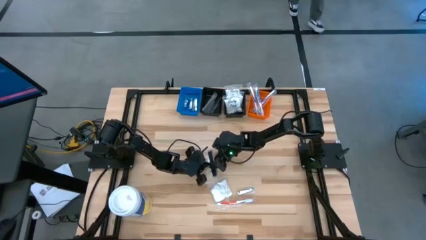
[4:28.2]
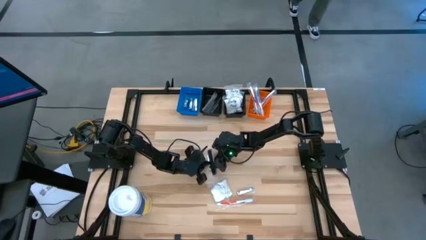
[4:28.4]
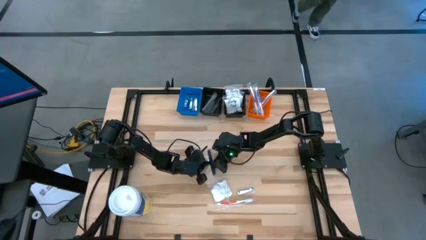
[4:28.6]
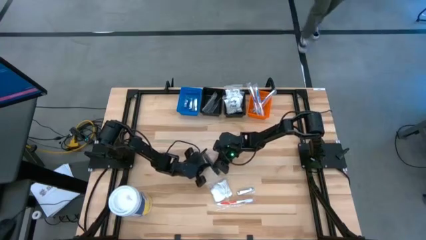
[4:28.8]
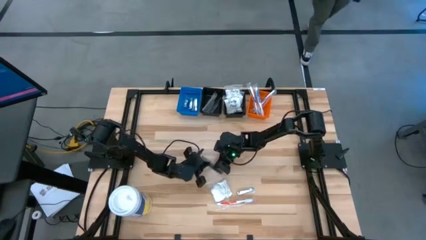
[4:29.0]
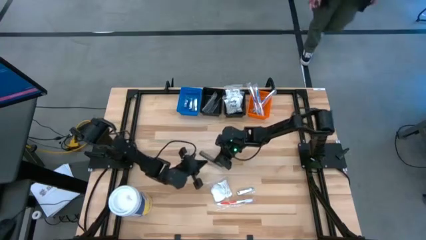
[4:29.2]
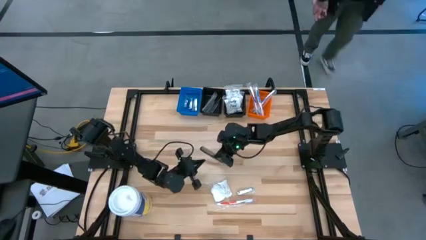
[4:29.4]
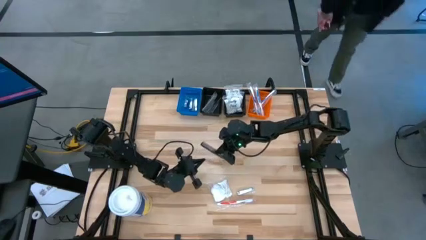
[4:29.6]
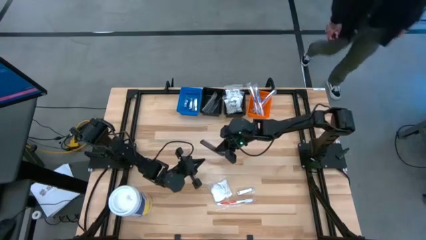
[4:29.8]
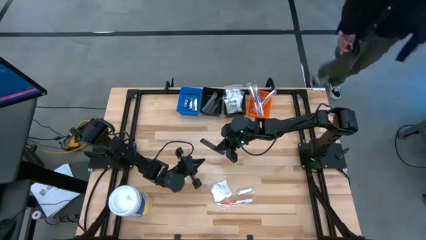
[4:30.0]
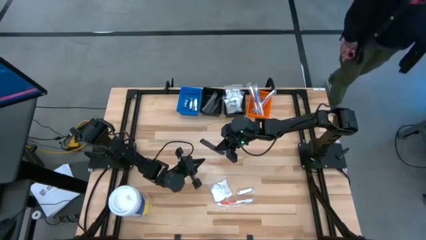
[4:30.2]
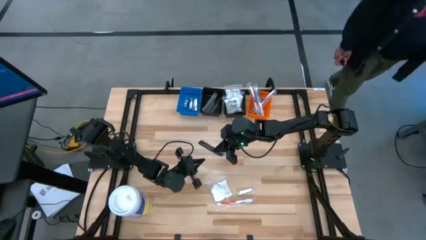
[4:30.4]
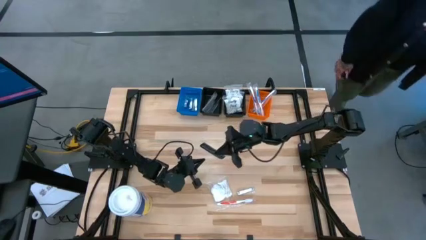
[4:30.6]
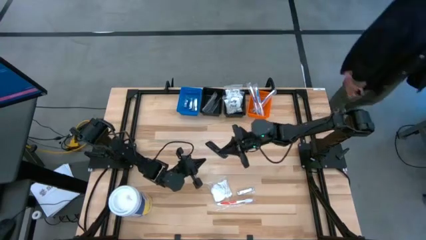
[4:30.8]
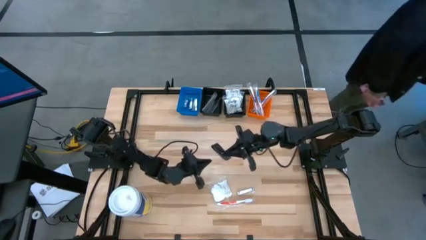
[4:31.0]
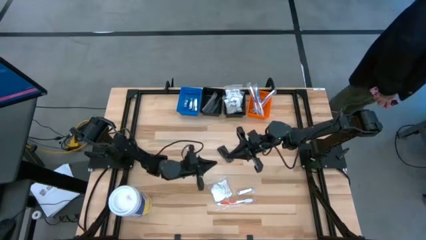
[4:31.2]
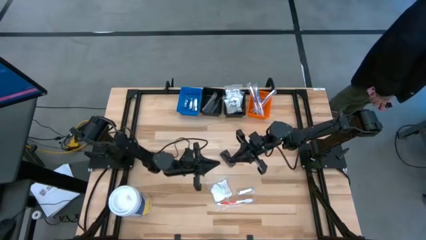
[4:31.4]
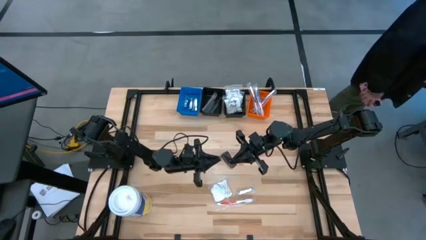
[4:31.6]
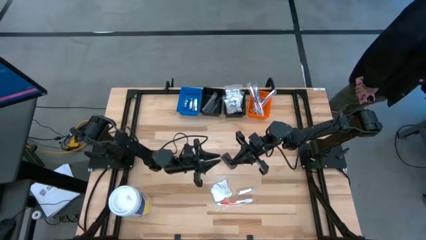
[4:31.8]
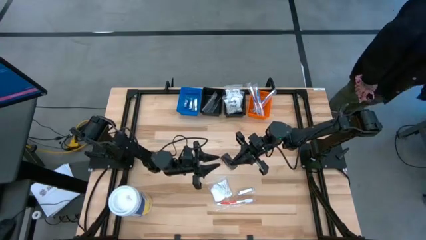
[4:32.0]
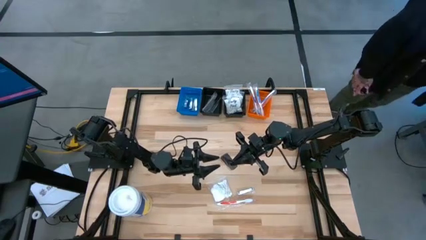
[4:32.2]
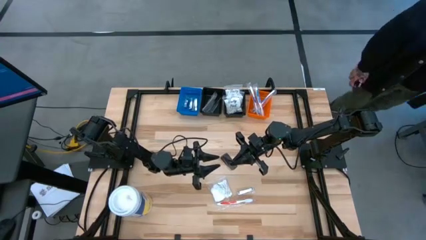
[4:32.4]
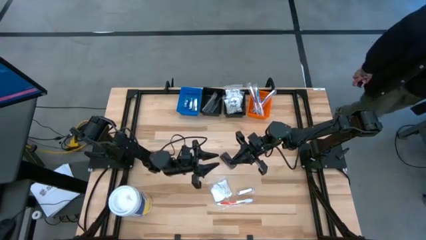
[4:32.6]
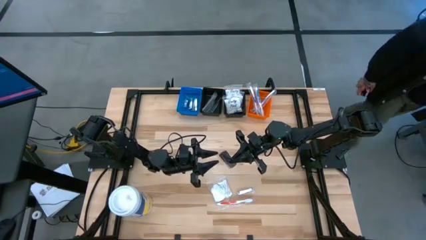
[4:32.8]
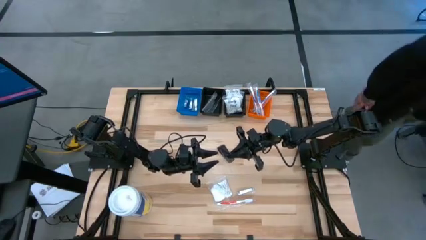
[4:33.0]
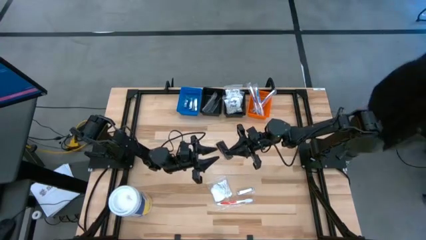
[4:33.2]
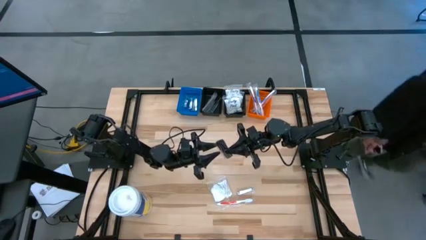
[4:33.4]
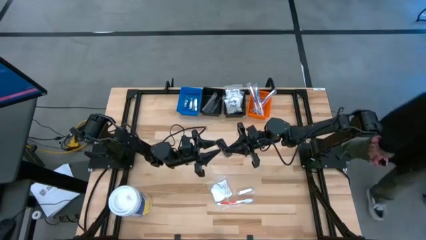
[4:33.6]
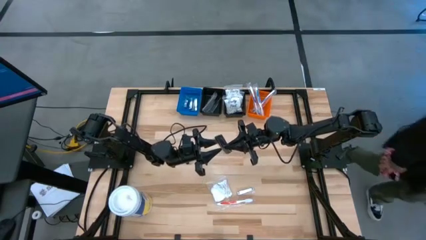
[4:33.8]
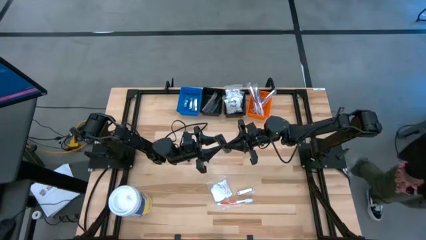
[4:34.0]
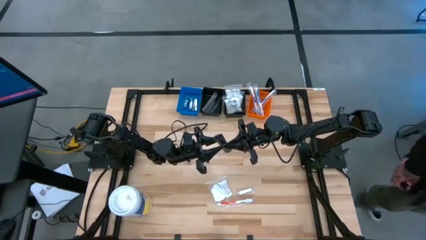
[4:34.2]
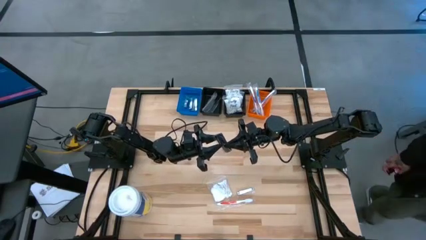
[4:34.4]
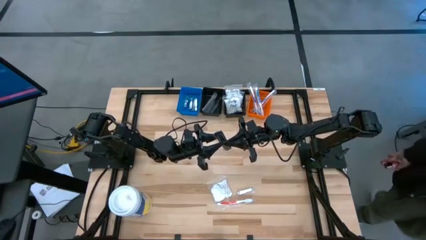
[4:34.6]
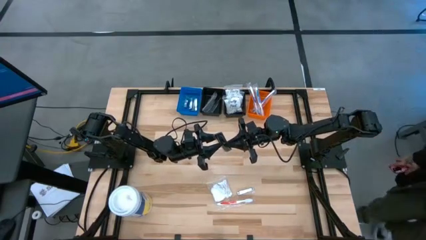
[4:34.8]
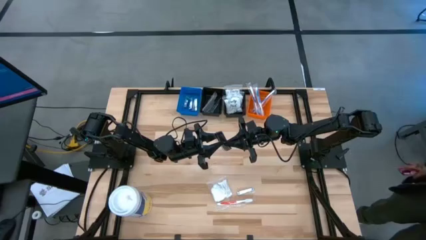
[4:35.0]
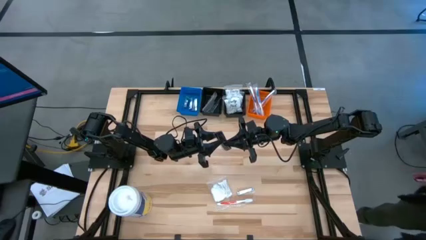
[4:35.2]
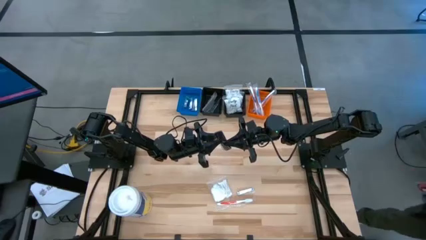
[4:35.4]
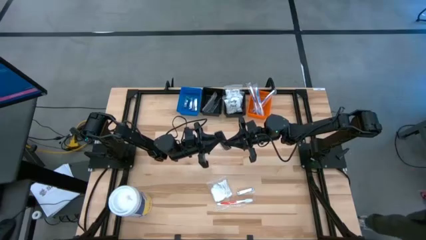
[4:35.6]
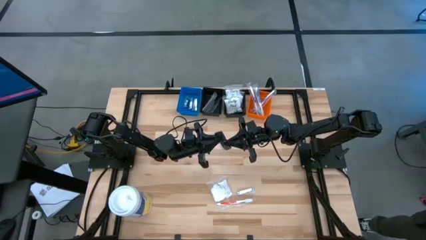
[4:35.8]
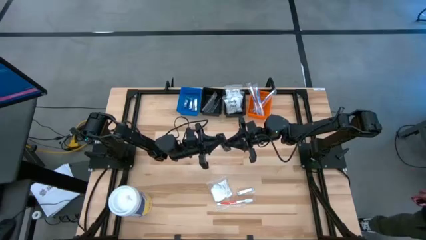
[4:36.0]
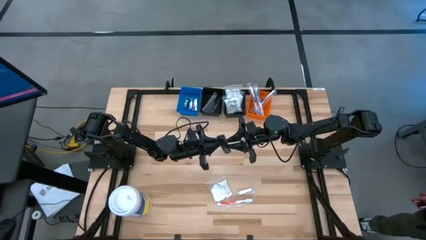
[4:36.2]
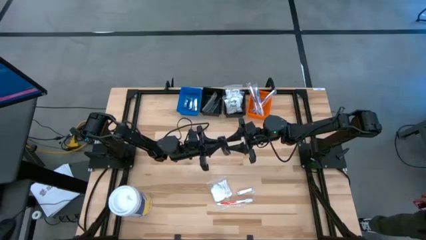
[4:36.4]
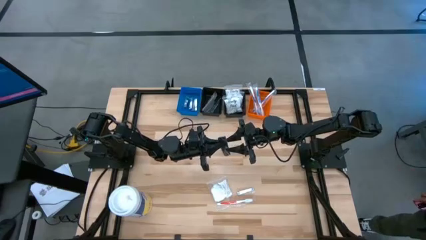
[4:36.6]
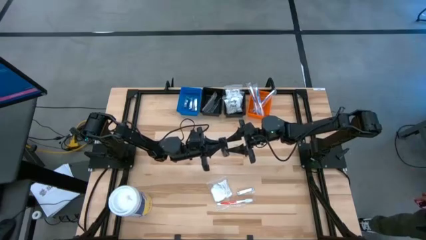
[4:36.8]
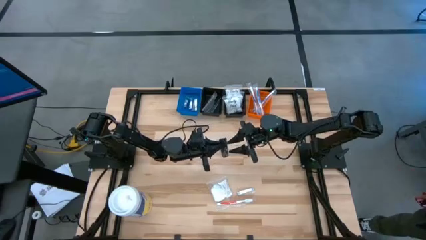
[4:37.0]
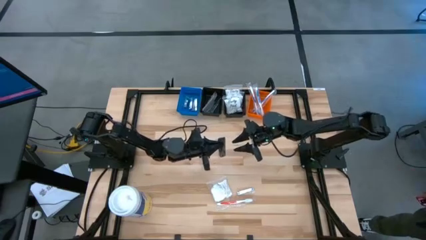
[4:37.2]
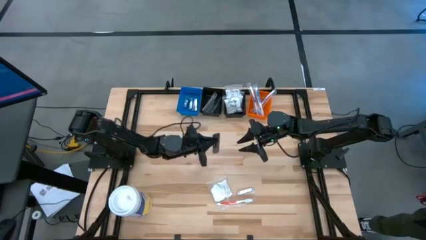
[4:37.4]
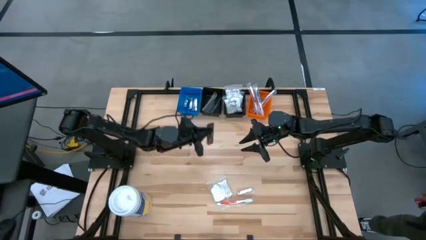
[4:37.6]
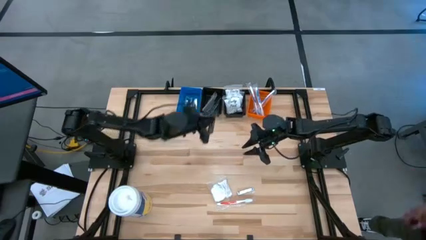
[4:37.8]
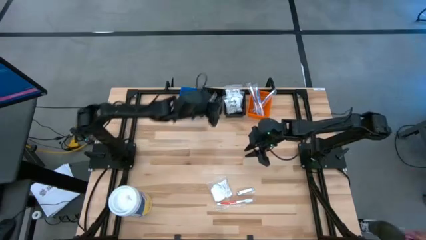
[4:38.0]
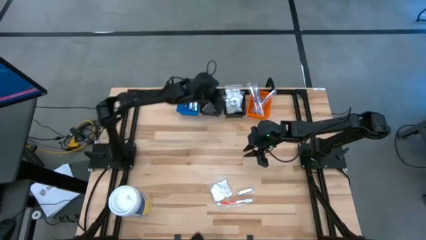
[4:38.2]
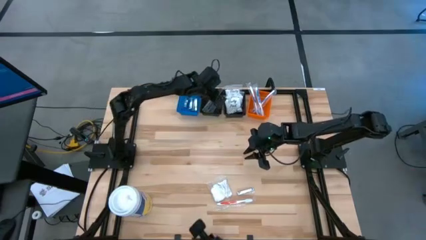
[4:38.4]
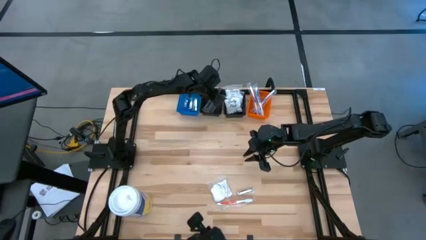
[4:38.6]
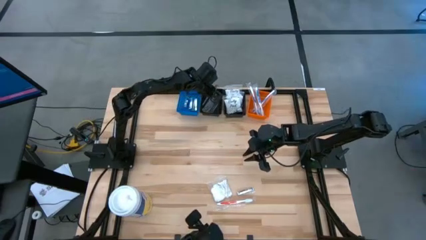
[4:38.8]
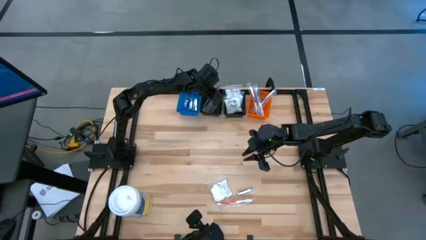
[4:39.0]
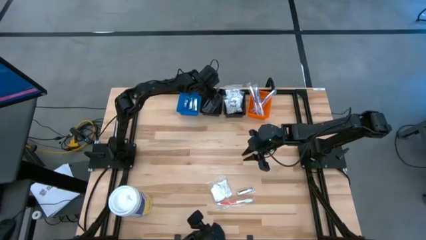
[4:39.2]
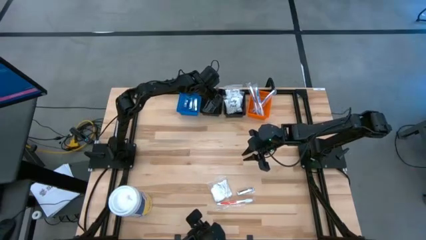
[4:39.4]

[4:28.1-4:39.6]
Task: Pick & Place Travel size toiletries
Put the black comb into the left black bin

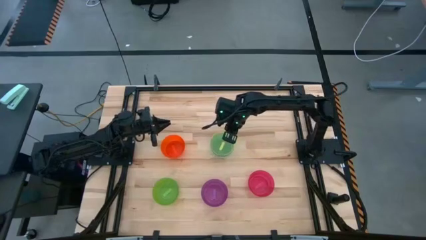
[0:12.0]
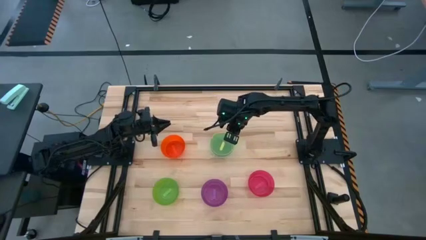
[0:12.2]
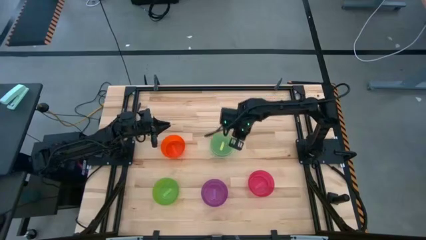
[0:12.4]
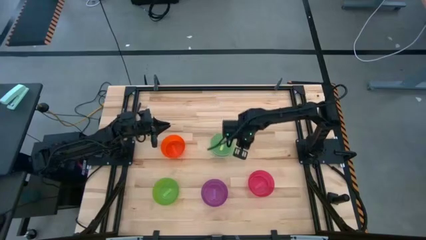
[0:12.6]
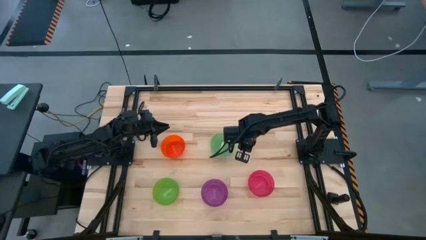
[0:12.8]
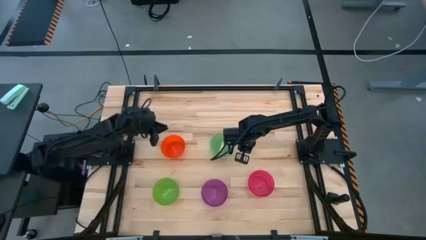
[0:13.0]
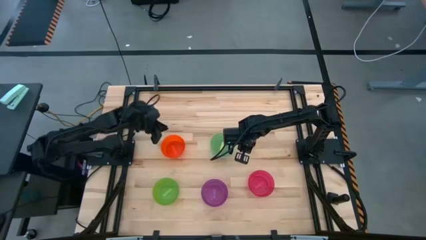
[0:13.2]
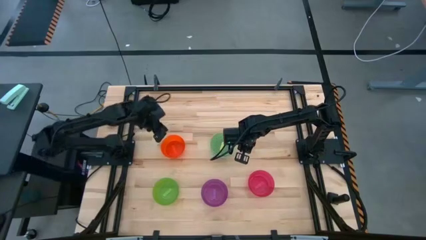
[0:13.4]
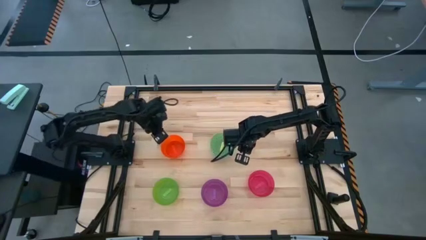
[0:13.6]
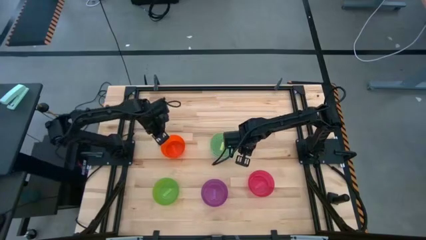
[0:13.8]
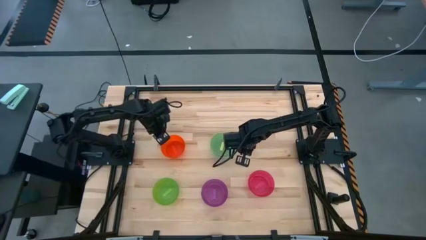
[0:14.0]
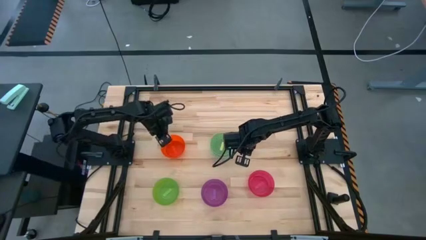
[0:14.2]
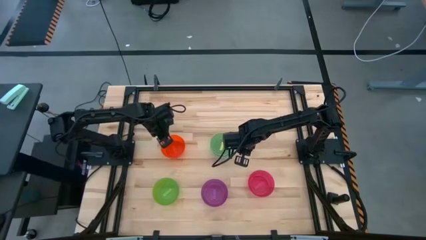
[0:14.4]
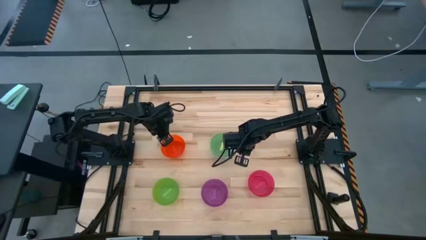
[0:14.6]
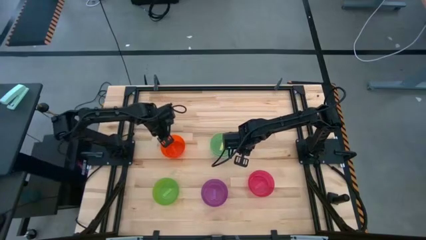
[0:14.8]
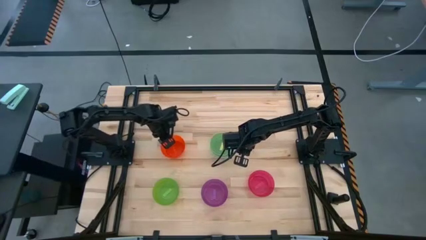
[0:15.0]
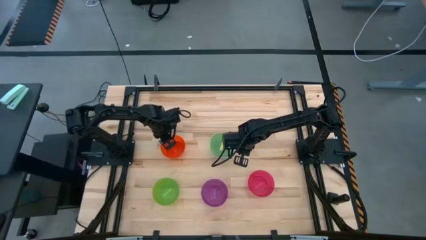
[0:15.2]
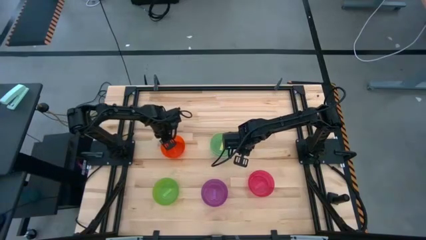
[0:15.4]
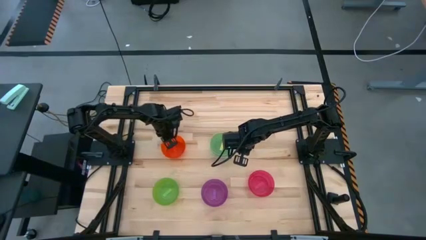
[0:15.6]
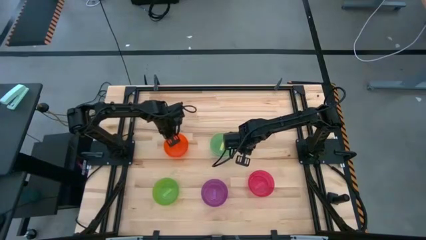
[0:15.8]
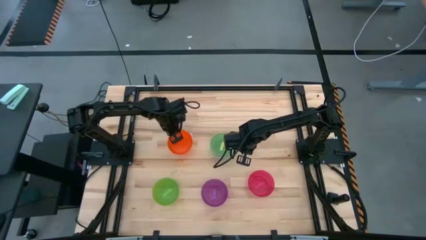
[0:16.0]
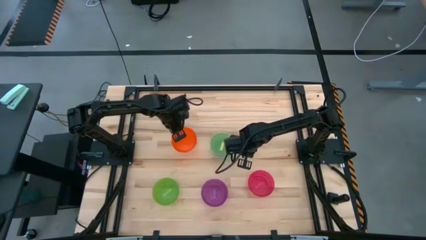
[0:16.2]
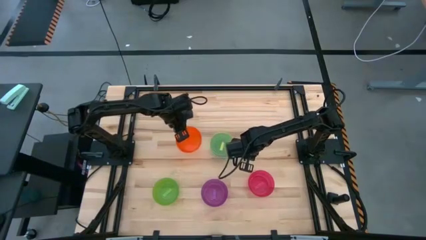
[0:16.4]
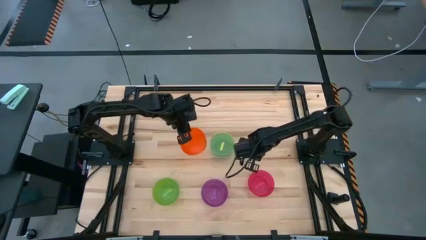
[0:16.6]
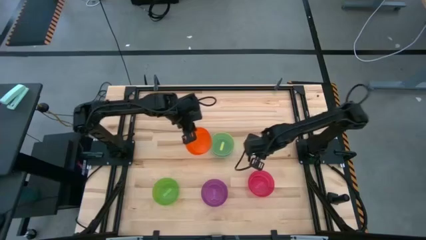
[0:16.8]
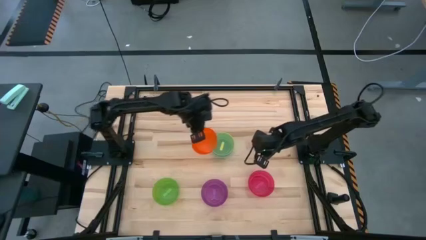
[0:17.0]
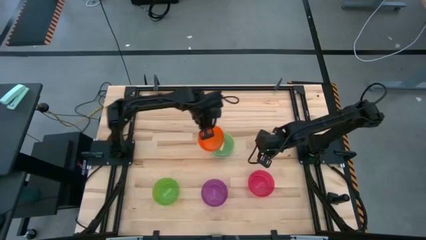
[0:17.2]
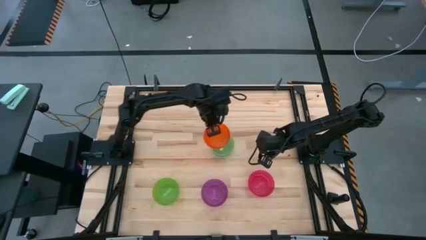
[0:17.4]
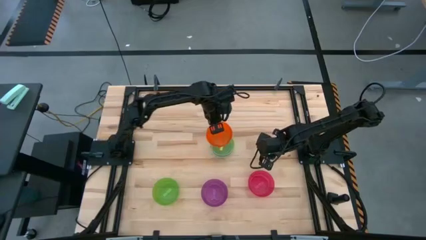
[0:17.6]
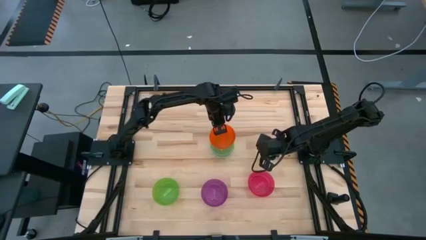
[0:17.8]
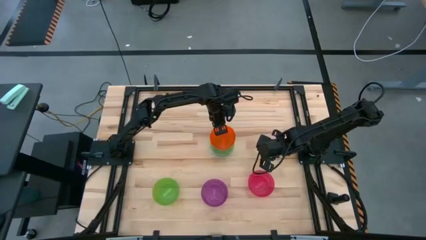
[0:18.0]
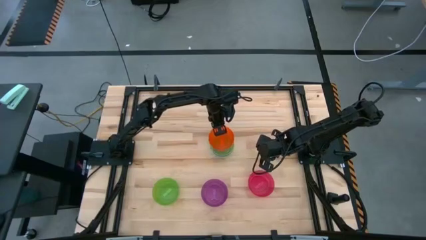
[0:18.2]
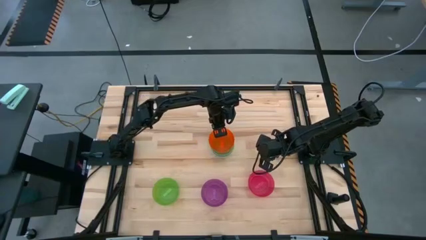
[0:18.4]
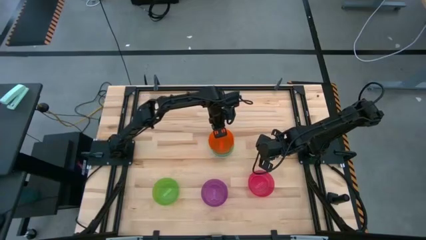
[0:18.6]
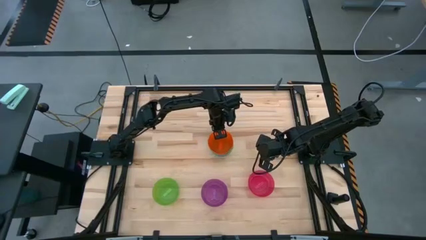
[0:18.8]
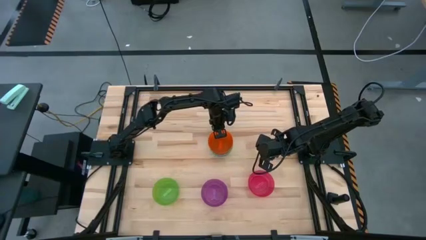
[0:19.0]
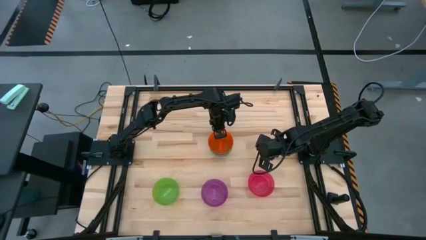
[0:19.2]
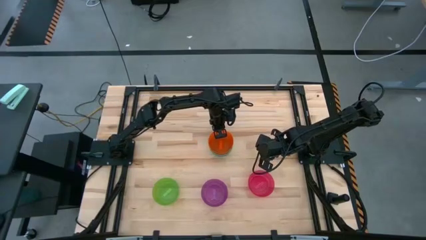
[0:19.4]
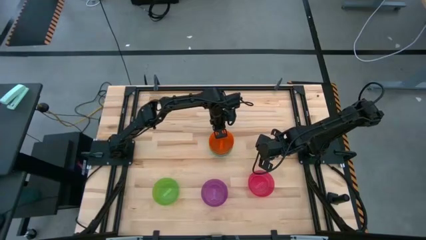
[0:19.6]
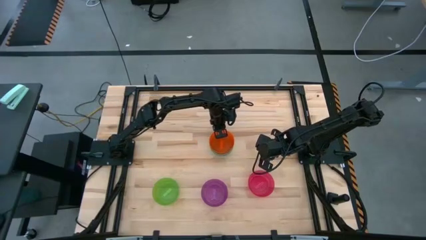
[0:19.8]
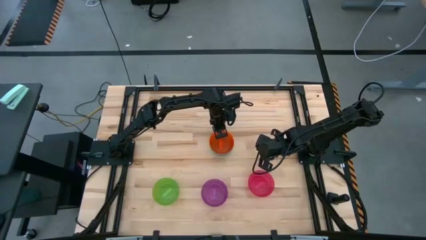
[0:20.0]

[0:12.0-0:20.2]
Task: Nest bowls inside each other
Stack the orange bowl on top of the yellow bowl
